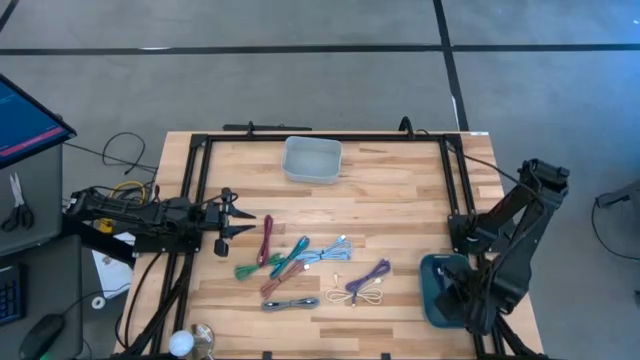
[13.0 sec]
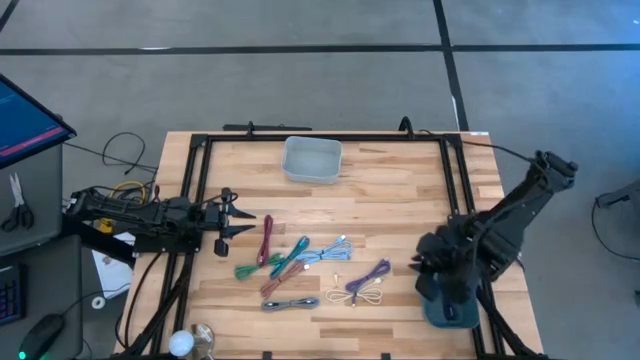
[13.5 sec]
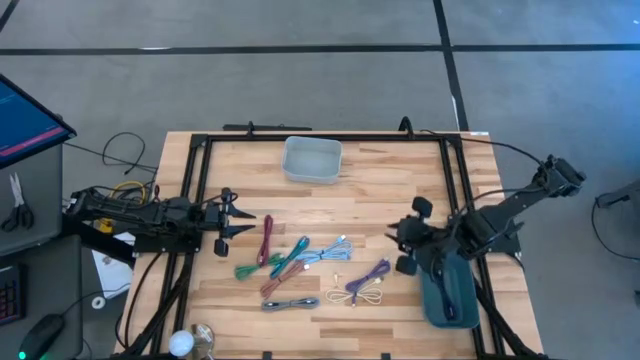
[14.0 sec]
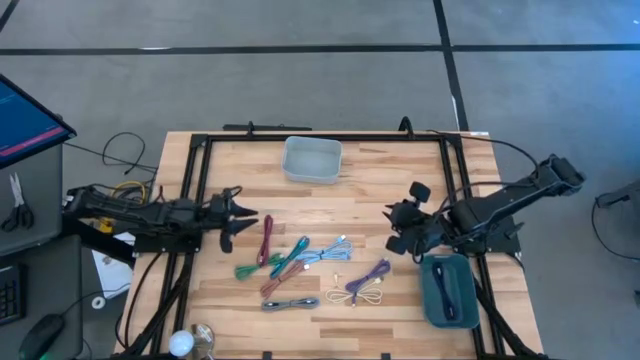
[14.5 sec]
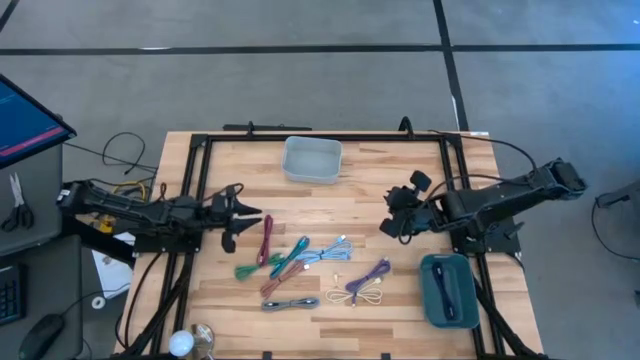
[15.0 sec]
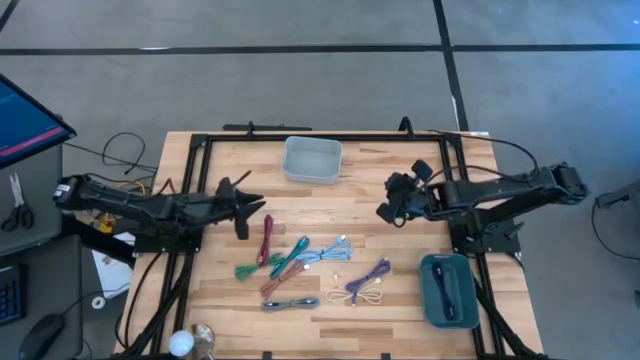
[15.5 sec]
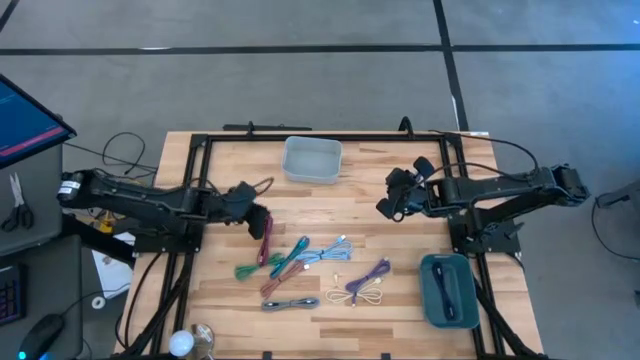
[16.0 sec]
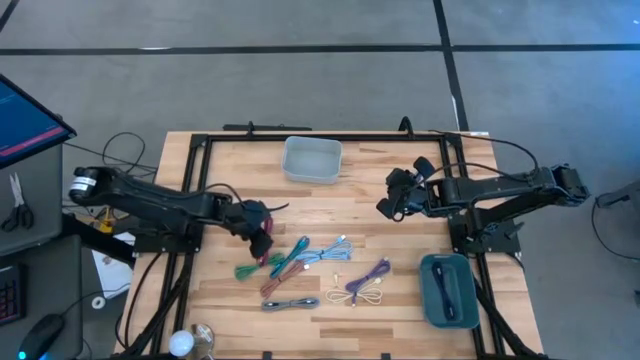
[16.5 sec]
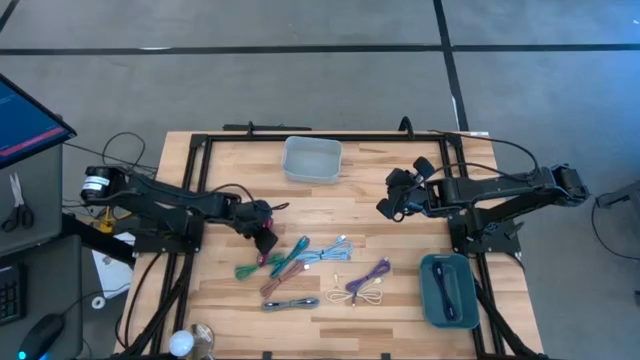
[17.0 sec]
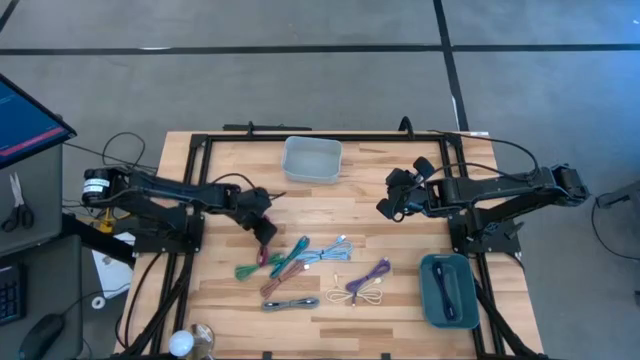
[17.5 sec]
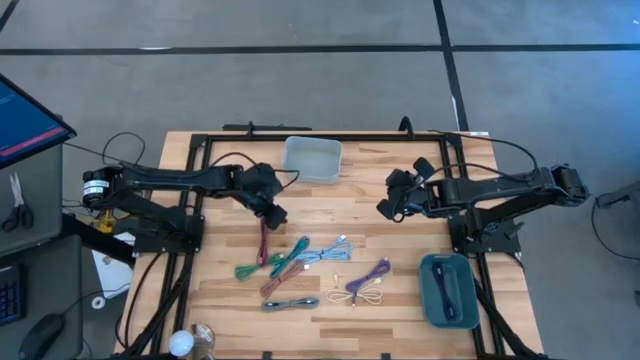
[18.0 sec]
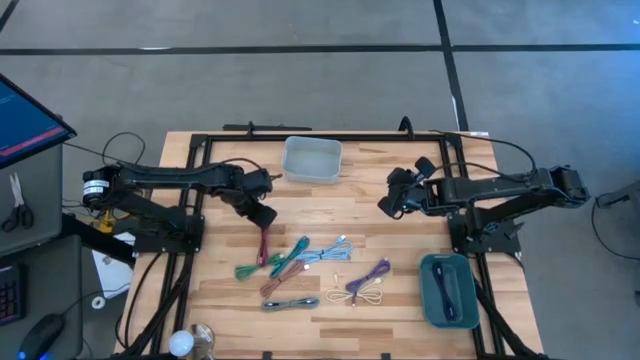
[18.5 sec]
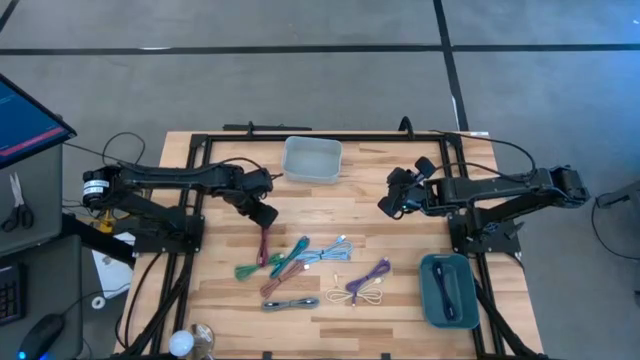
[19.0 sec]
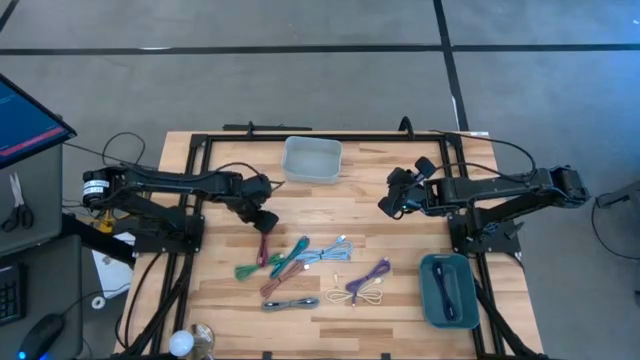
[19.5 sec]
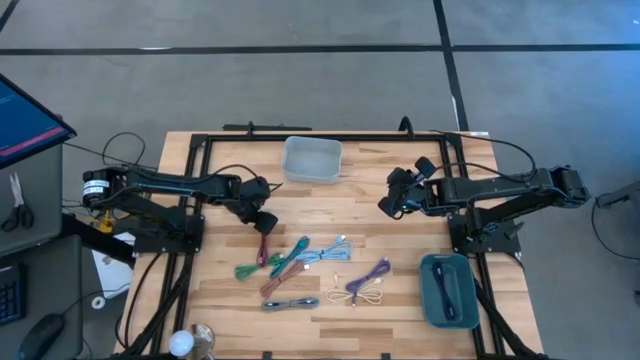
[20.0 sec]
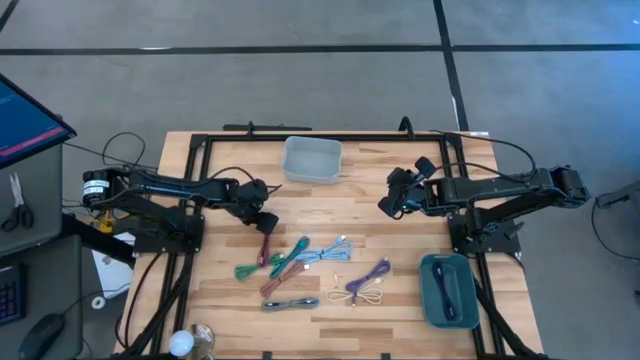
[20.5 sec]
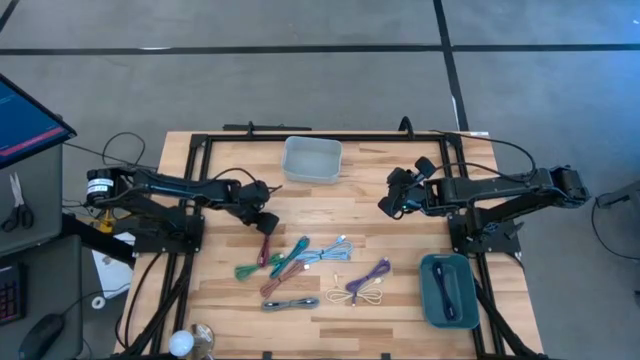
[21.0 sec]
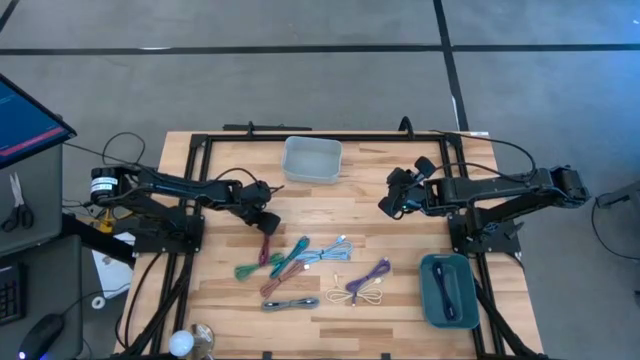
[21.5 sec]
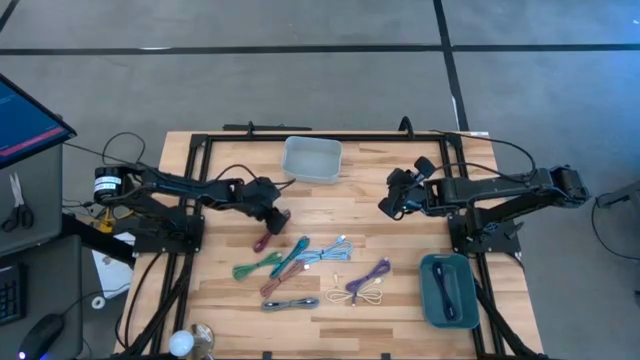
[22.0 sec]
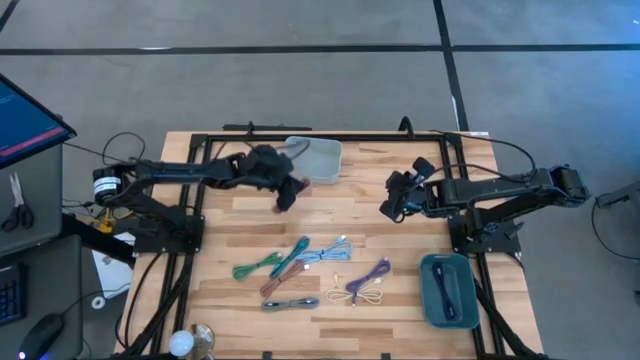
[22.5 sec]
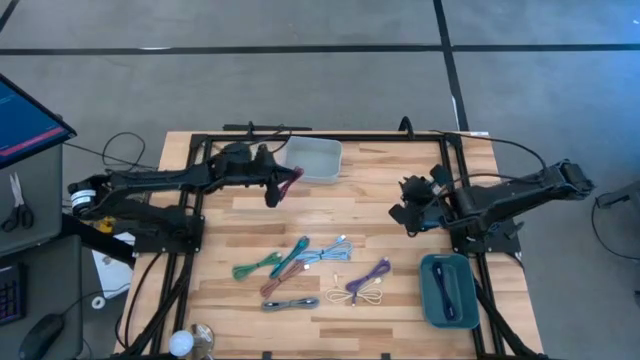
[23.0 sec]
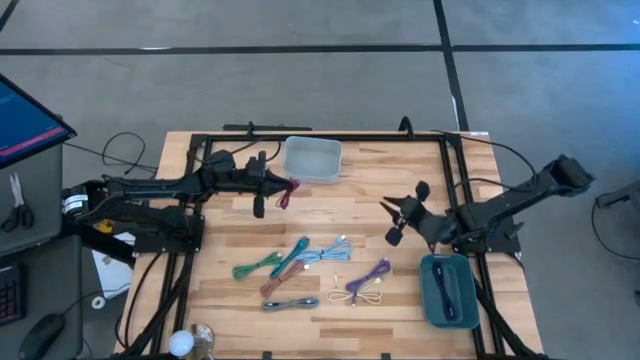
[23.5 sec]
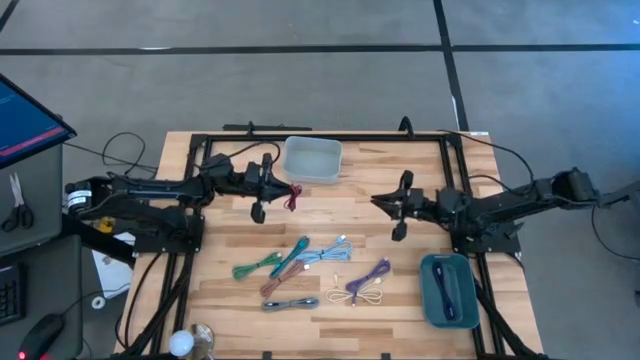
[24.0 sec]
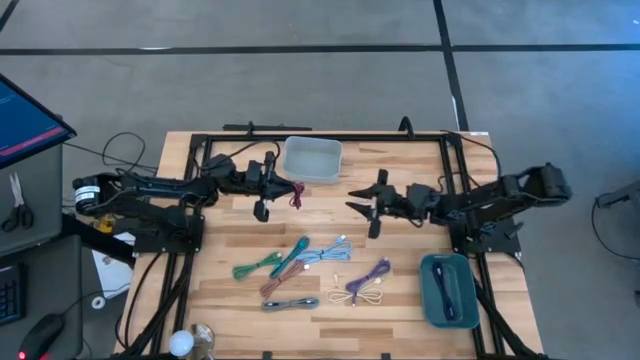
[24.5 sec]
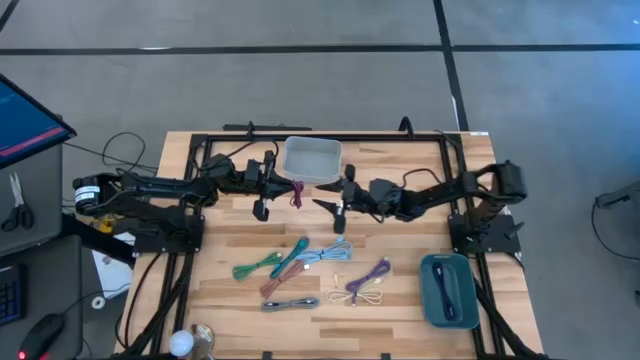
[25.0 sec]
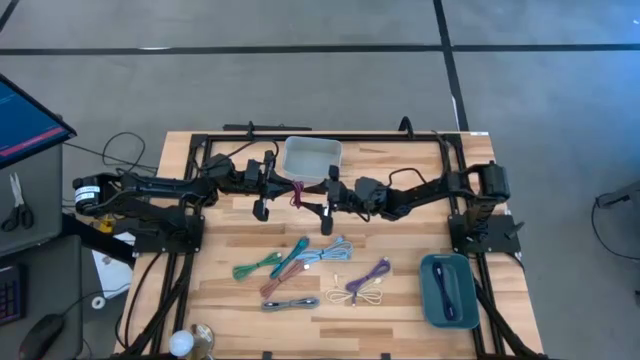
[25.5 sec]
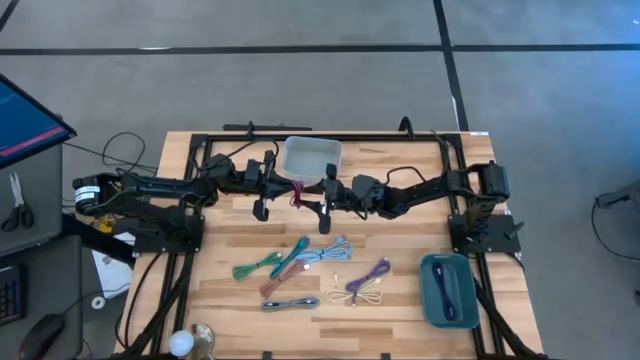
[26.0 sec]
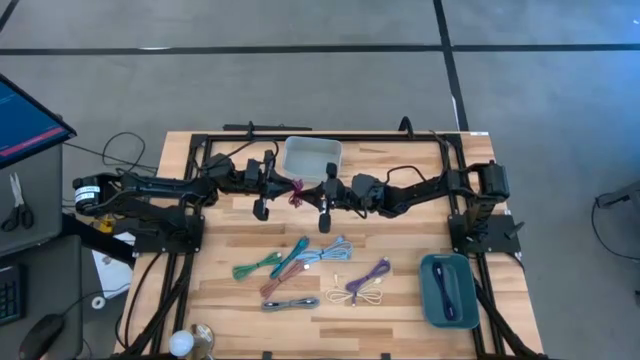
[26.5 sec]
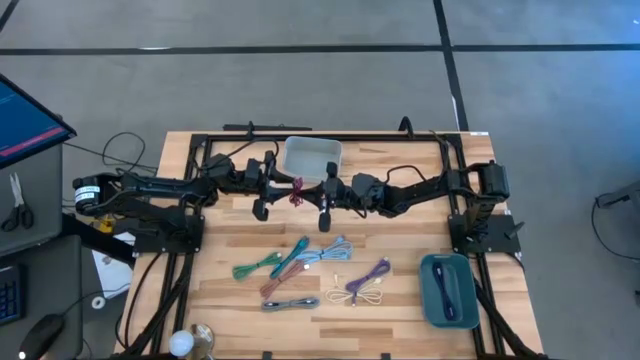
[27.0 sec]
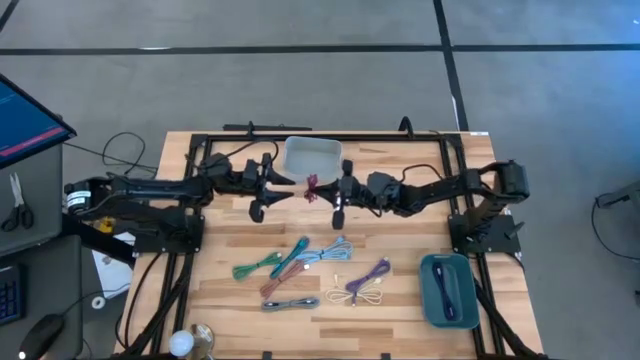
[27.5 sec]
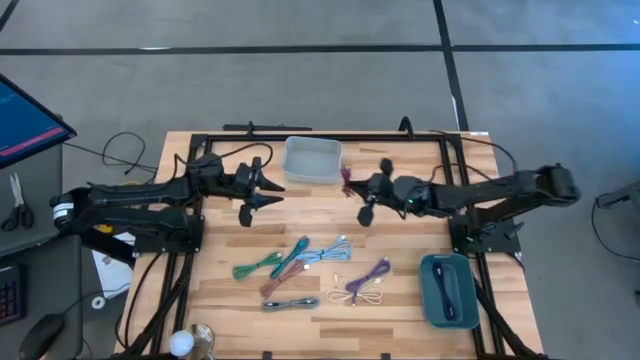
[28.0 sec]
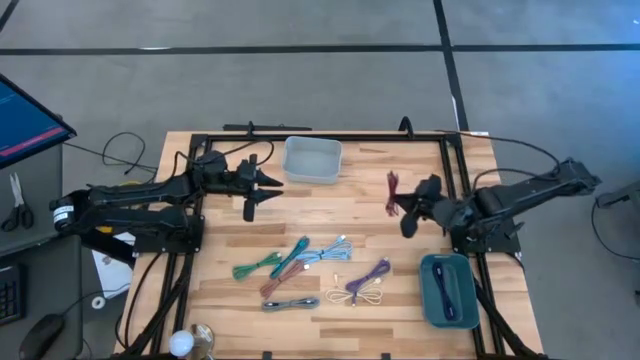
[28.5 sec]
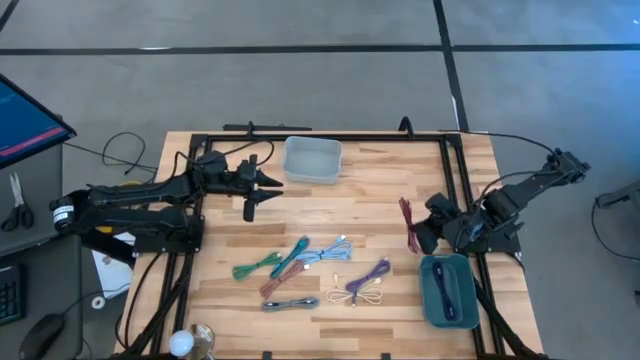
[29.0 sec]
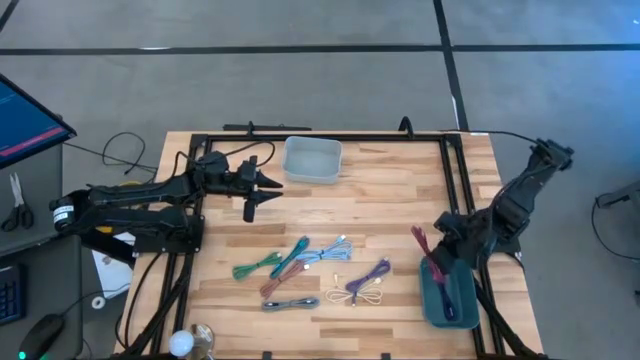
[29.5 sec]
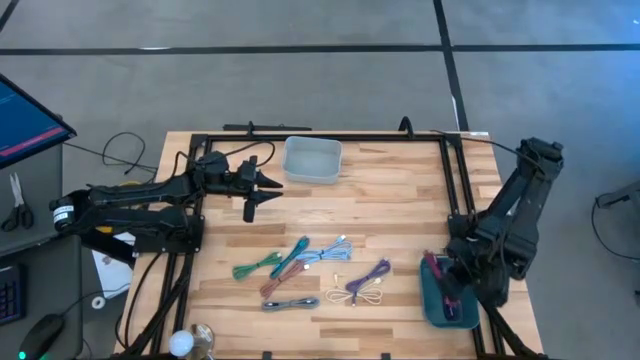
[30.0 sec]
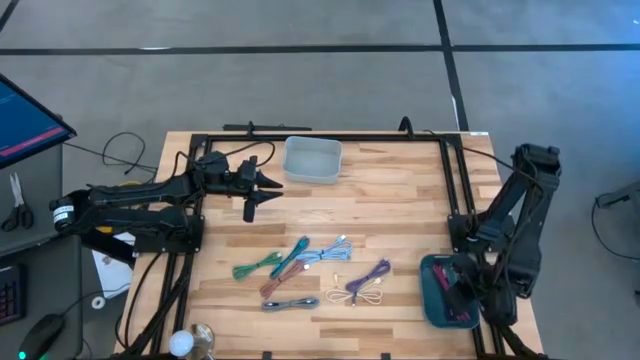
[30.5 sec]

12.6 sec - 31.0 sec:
Task: Pick & Place USB Port
Put the pink patterned charger cable into the blue bin

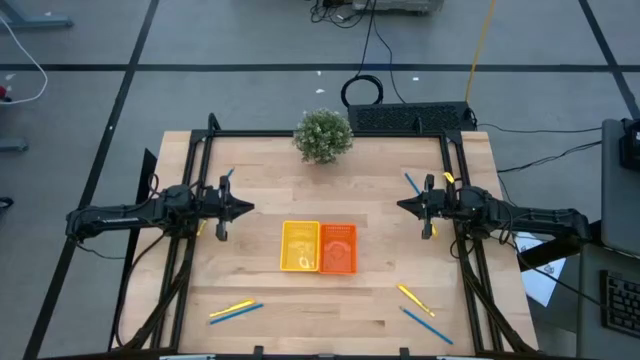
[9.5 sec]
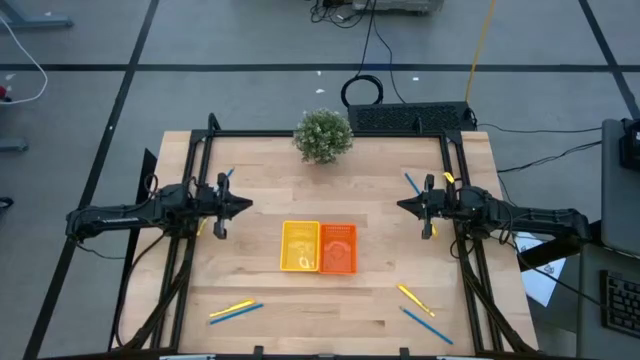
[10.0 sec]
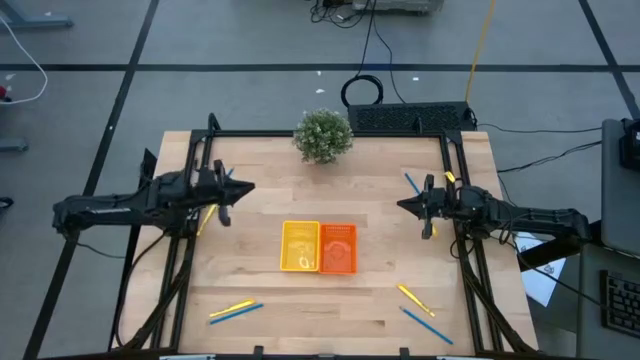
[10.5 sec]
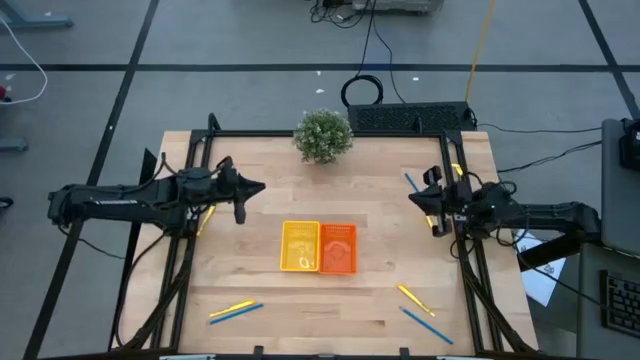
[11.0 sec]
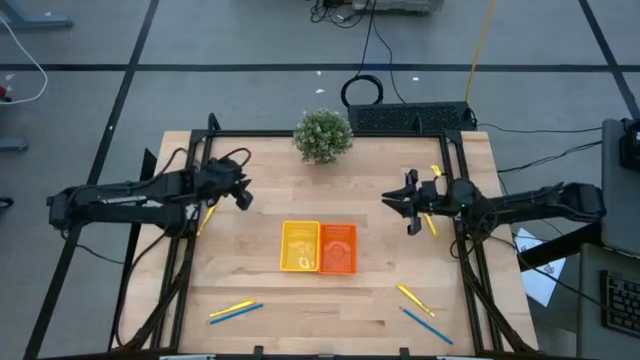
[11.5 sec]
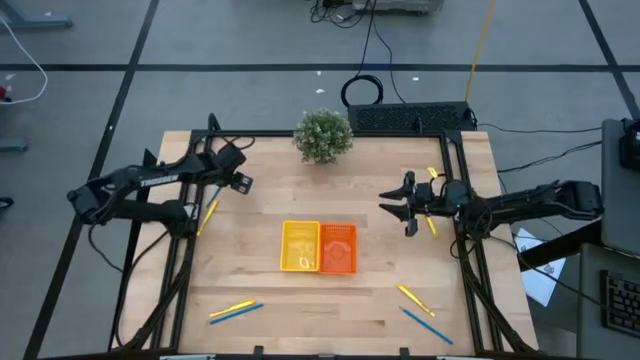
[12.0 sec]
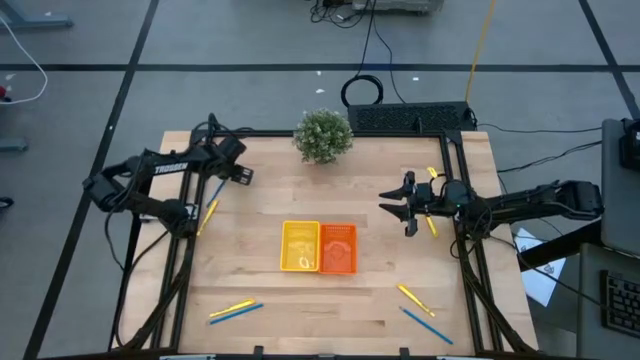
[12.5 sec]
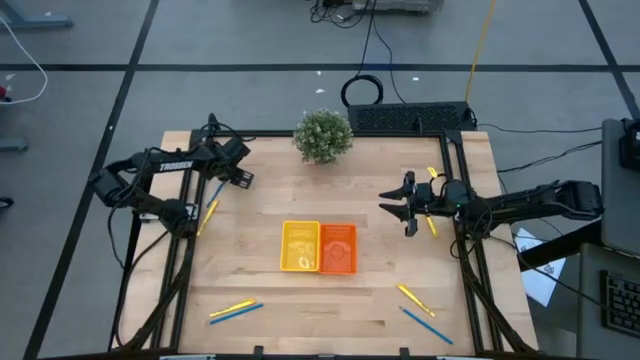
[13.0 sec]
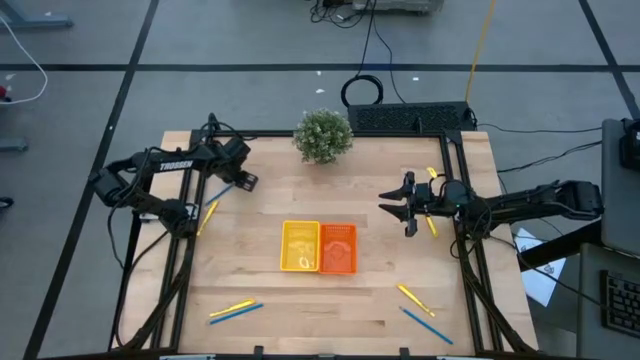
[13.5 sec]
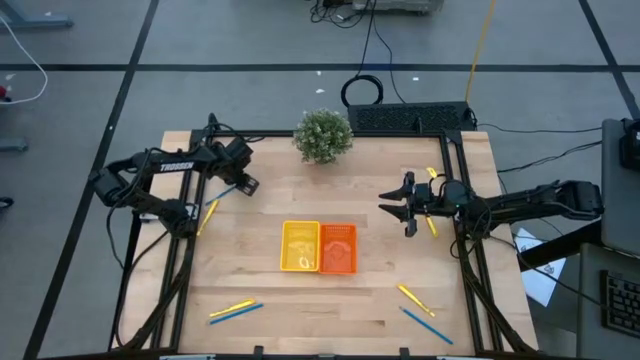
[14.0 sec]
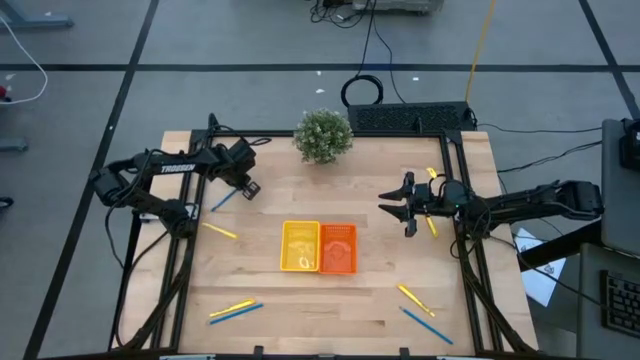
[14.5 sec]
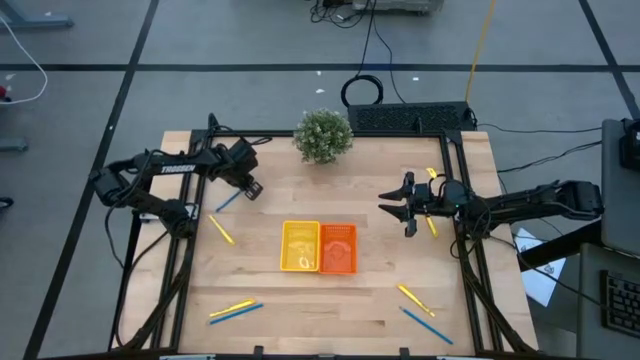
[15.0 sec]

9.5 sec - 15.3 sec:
Task: Sort pens & pencils
Put the top left blue pencil into the yellow bin
